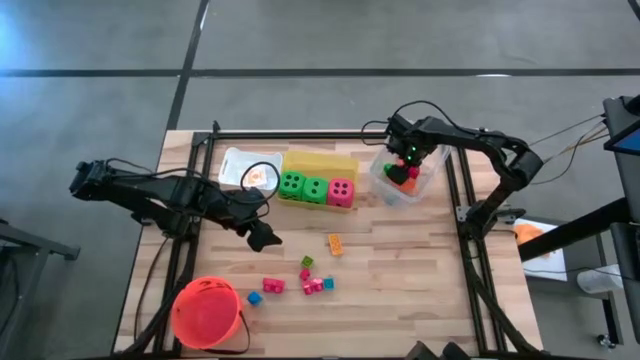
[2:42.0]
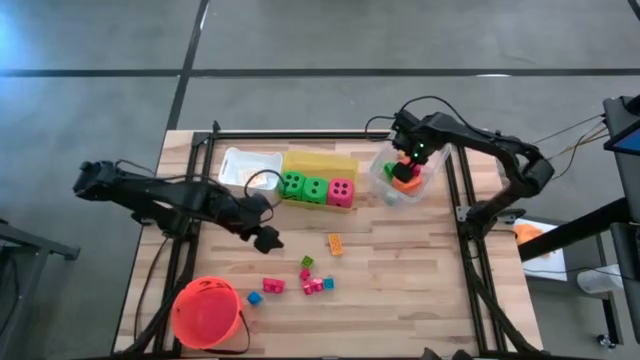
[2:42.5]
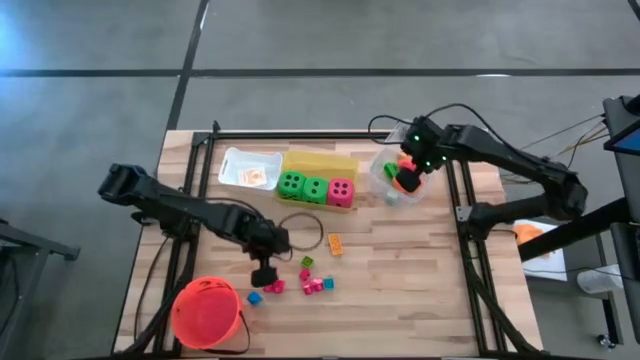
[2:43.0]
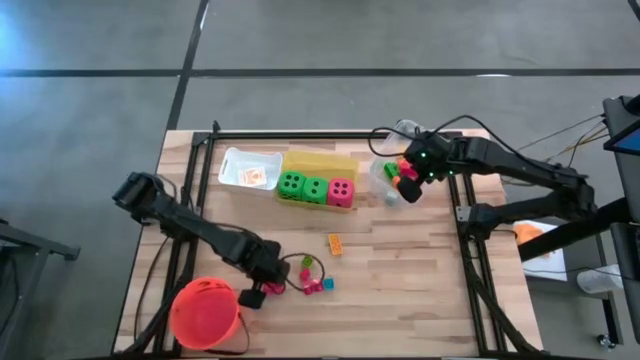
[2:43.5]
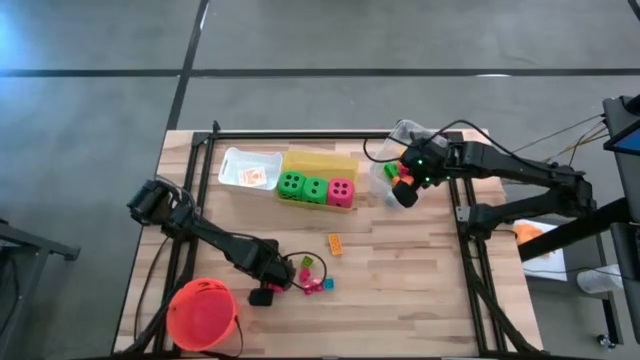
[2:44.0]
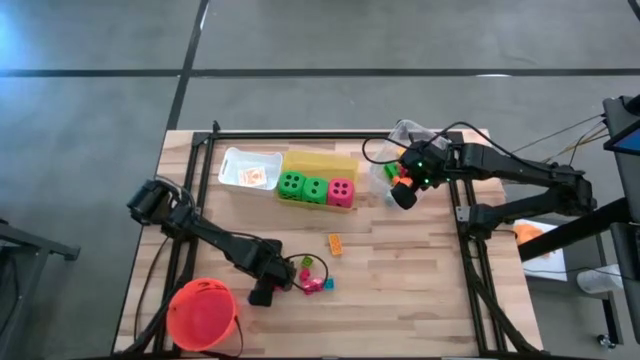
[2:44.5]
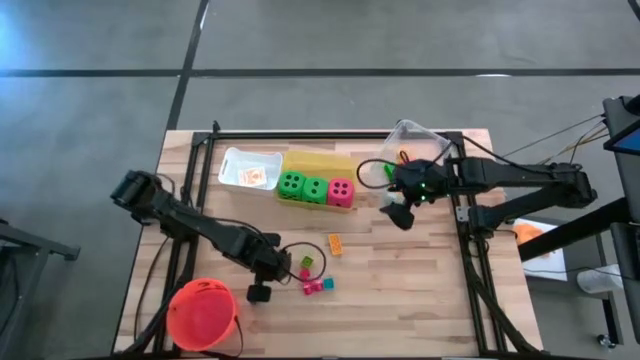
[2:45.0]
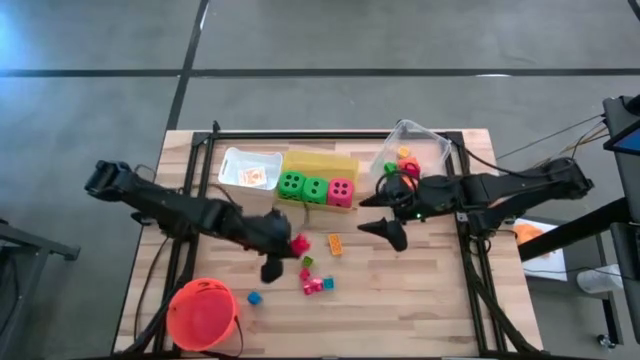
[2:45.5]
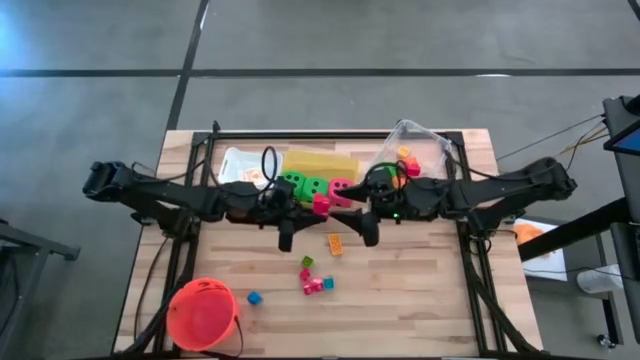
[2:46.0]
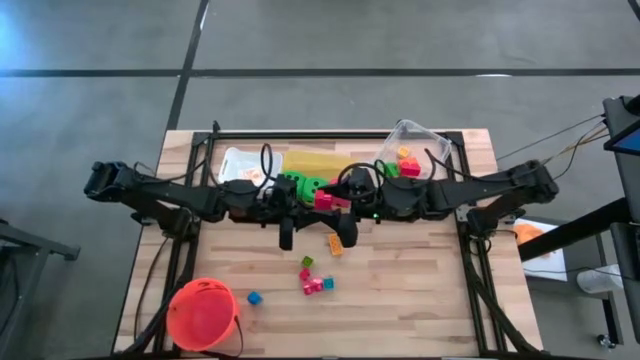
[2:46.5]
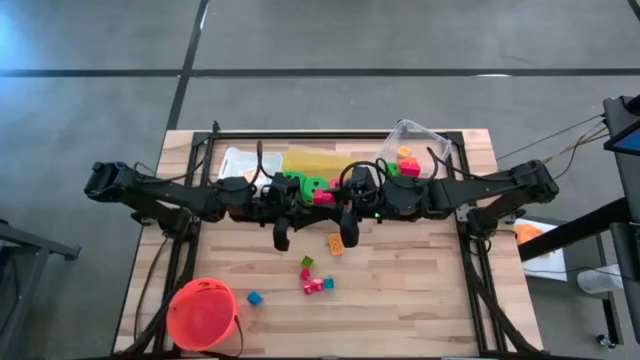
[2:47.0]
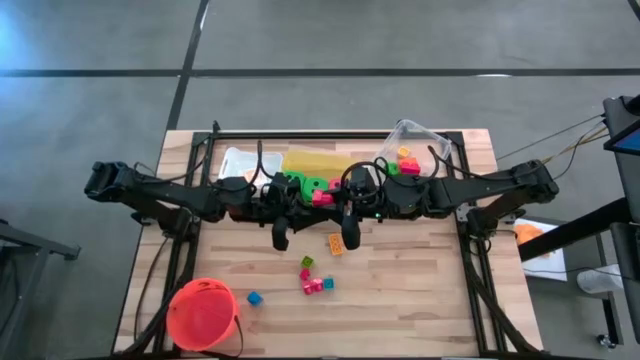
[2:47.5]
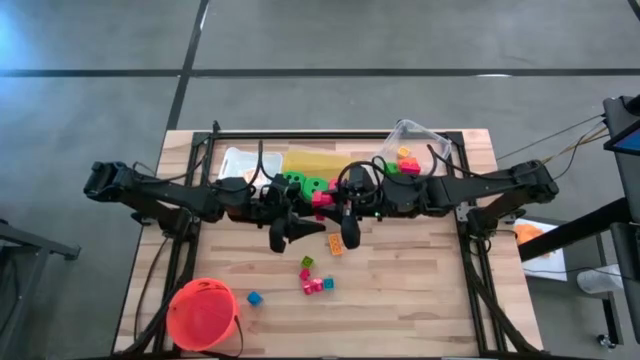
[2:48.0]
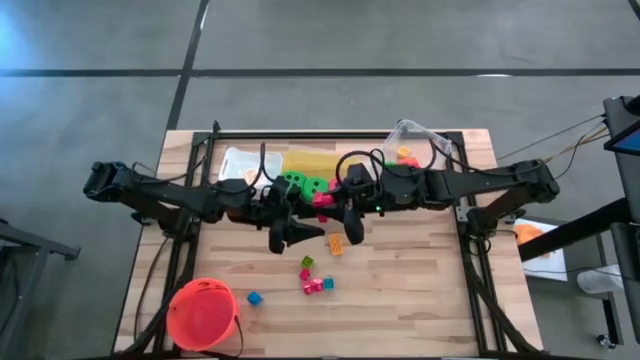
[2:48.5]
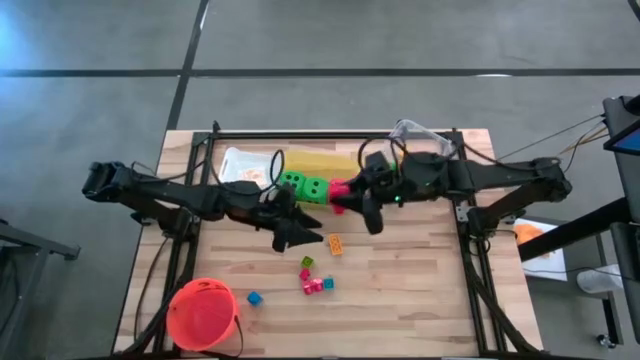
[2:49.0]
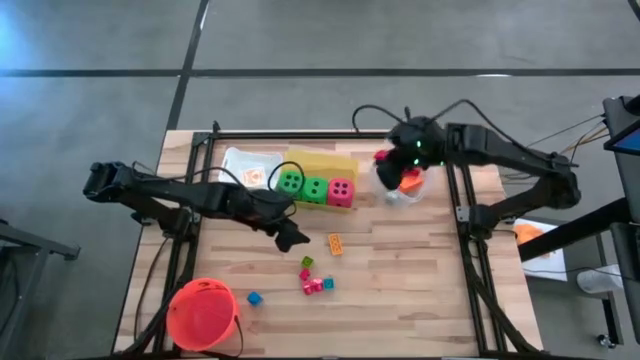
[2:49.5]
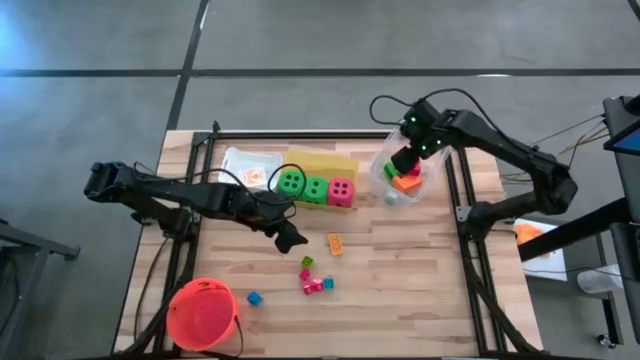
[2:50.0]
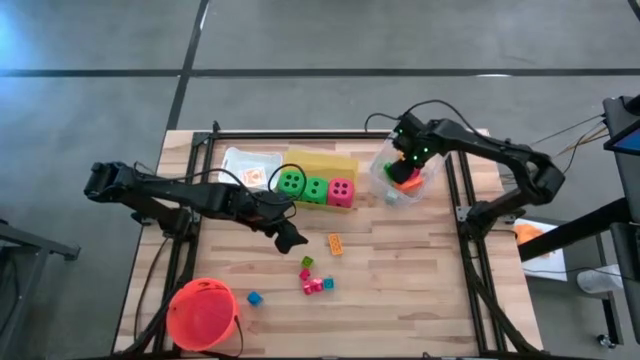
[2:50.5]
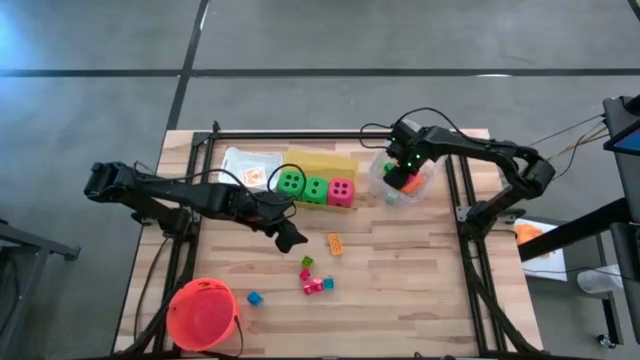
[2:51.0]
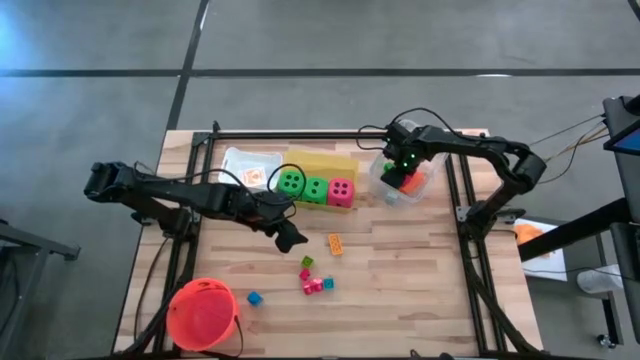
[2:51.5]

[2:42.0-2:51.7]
Task: Pick & Place Toys
Put the left red game piece into the transparent bin

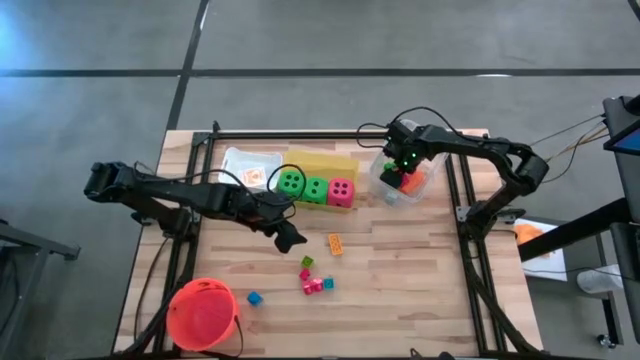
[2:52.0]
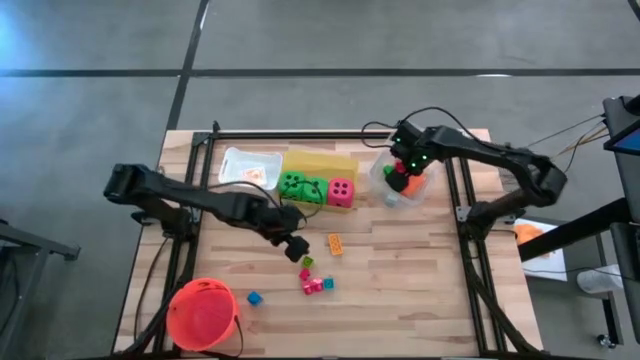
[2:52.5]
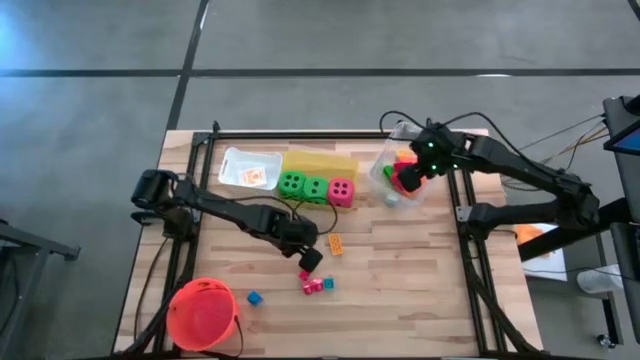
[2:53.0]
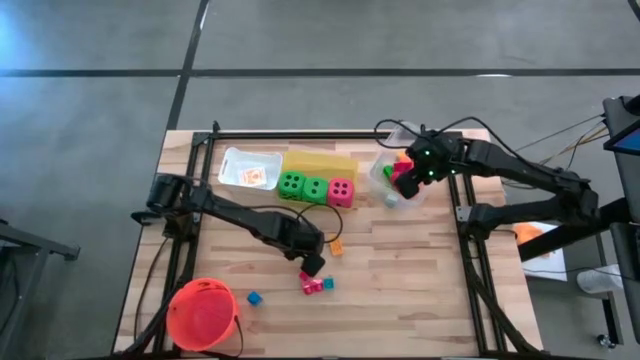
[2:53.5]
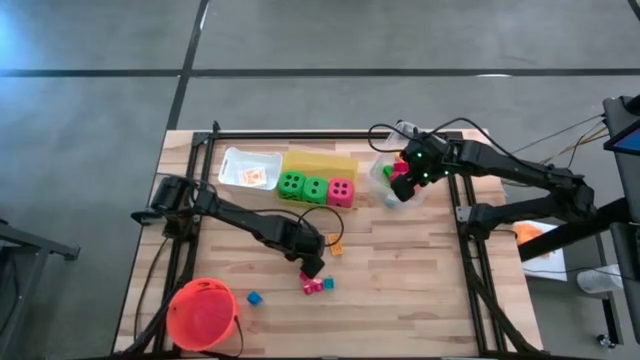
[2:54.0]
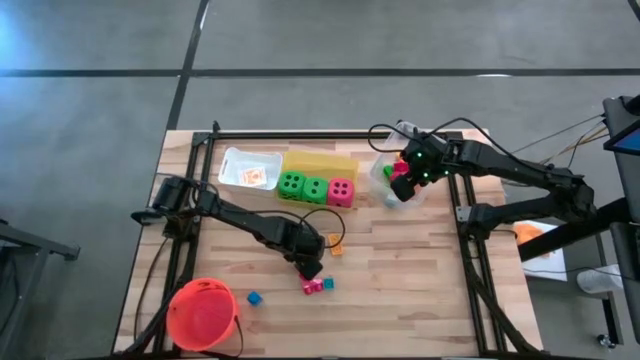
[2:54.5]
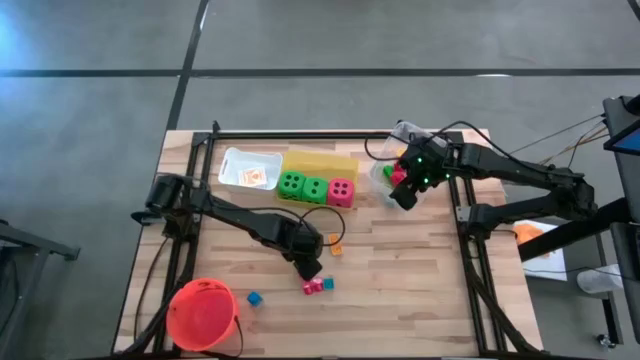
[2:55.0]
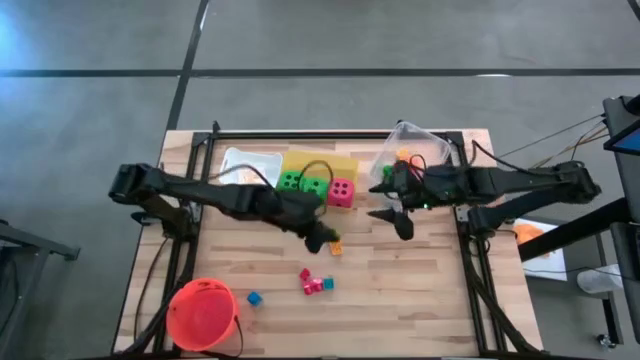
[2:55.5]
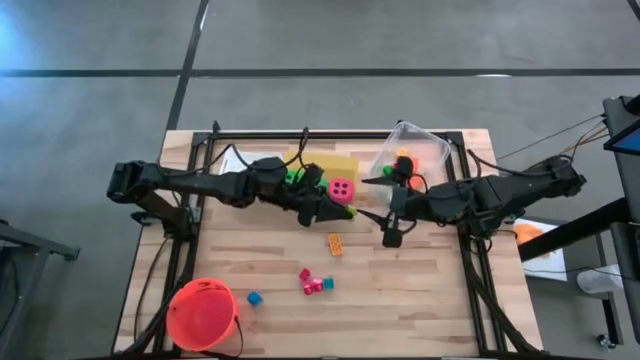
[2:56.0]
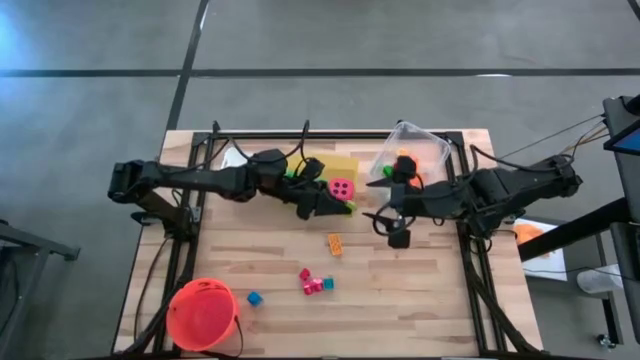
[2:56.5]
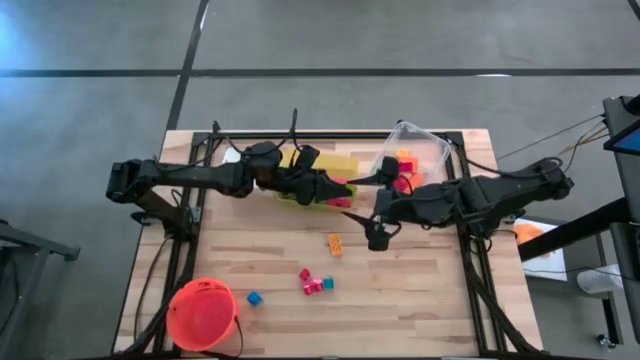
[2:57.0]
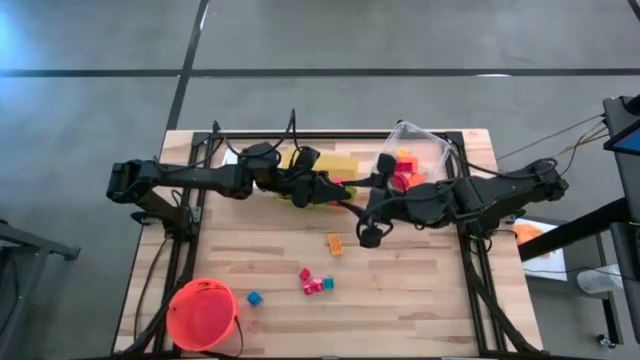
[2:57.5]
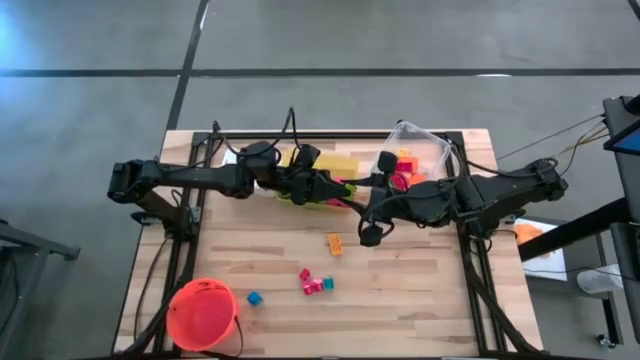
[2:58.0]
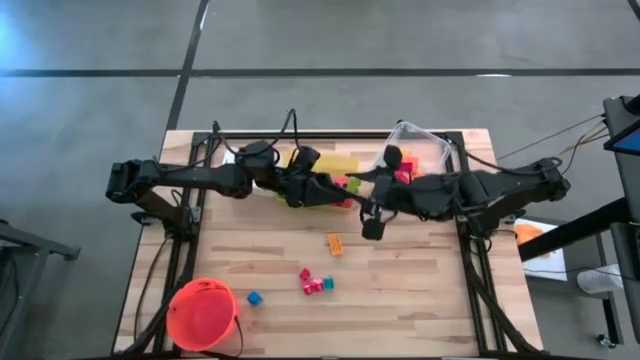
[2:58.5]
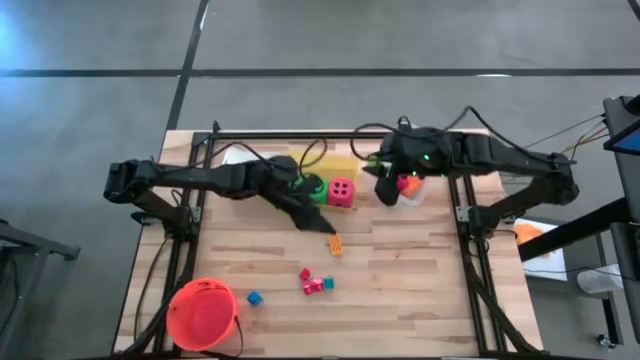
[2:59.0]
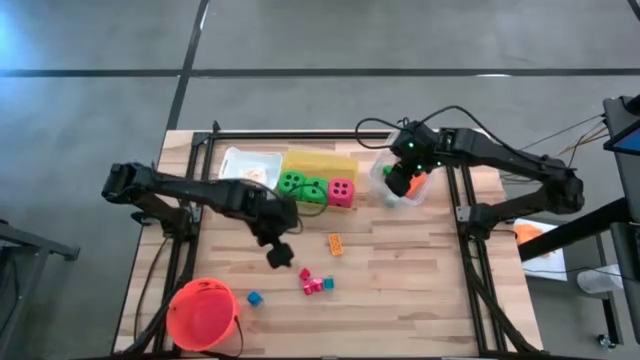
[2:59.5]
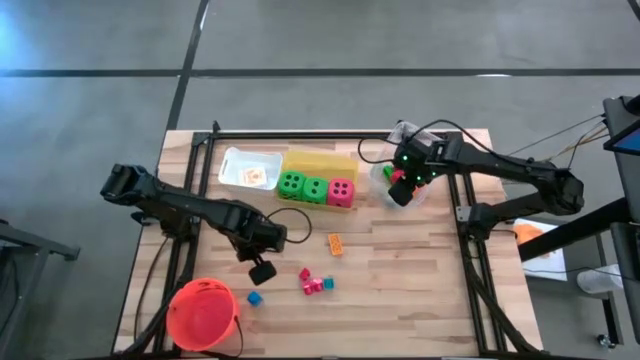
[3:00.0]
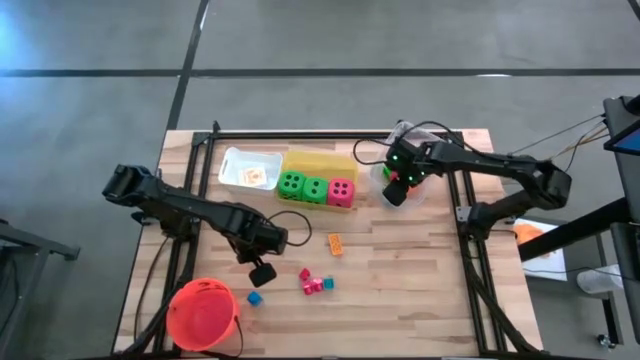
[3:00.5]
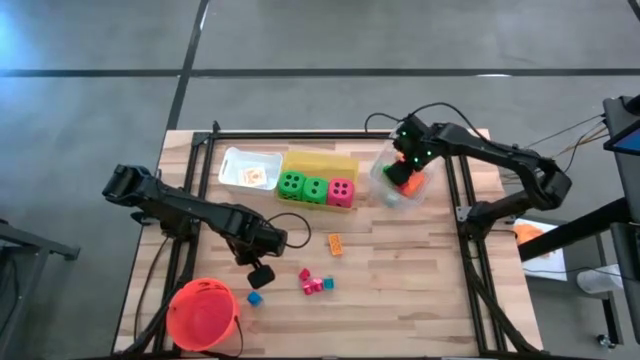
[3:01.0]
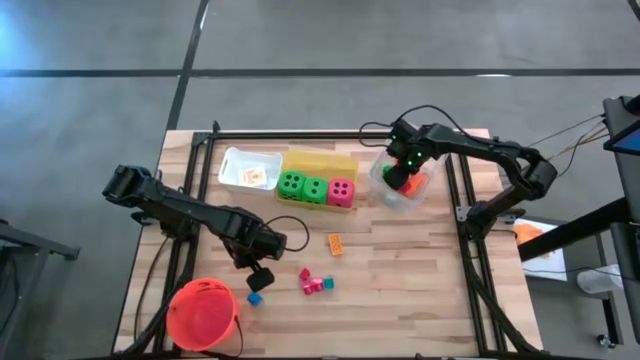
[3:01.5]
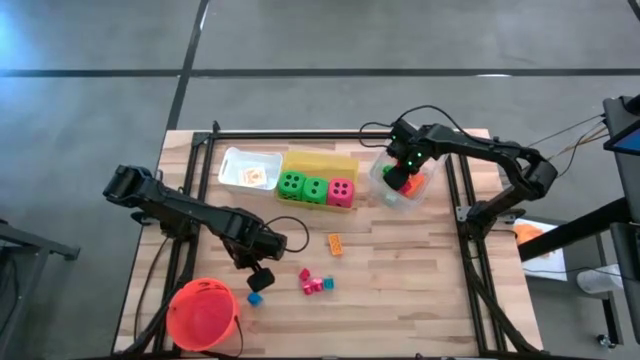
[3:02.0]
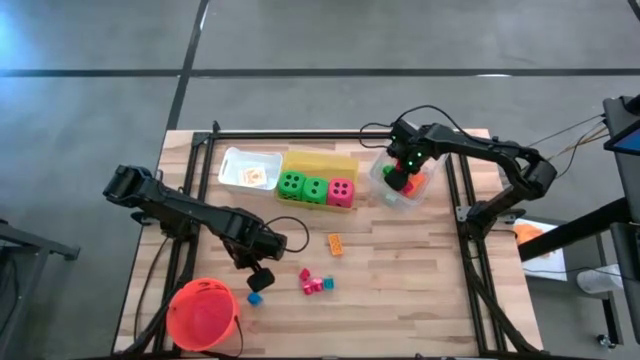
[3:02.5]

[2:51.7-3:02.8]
Put the green game piece into the transparent bin

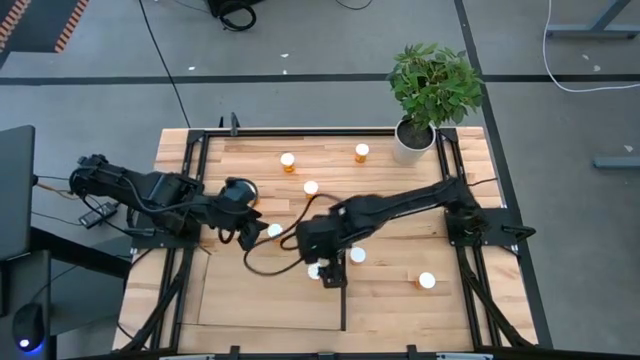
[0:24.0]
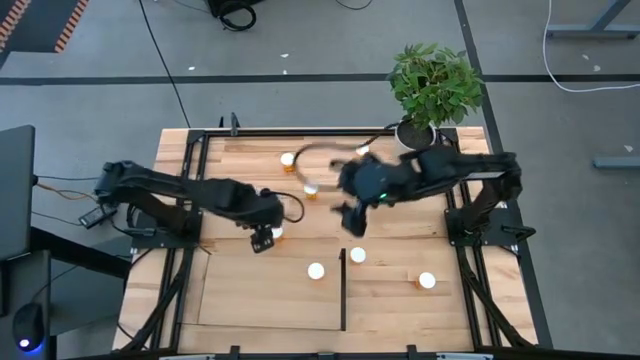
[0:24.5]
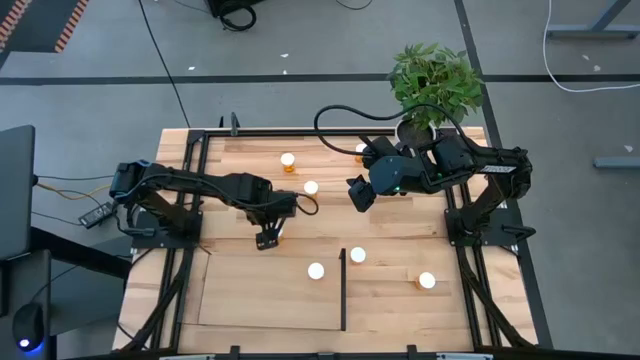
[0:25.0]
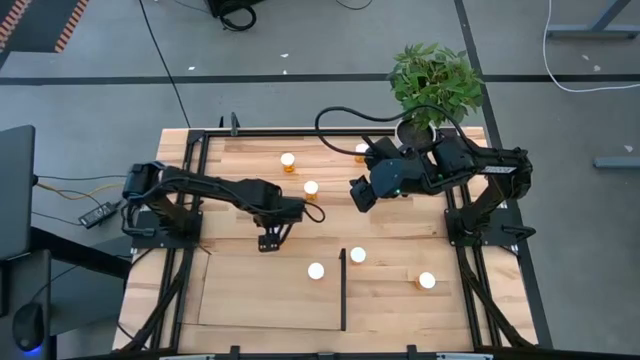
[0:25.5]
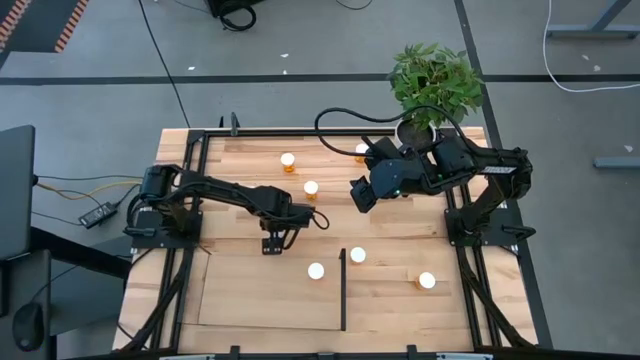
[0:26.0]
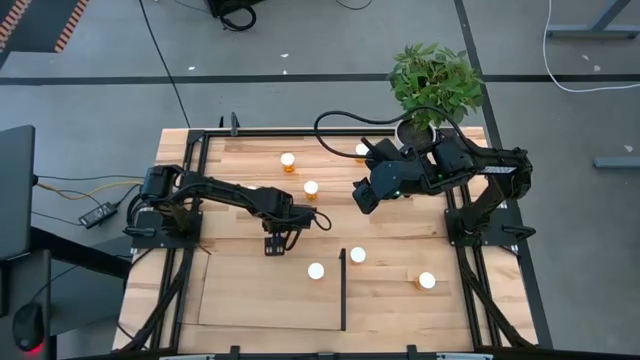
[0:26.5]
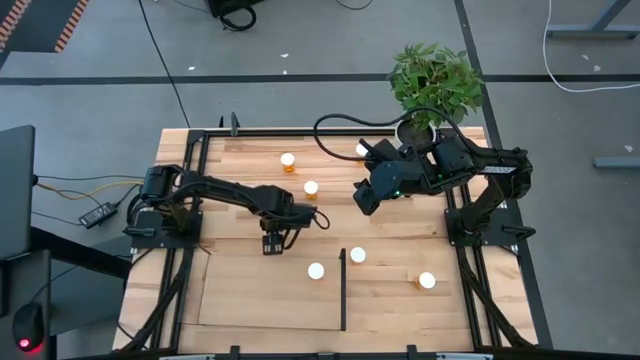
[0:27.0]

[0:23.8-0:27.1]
Task: Pick and place medicine bottles onto shelf by color
Align the orange pill bottle with the other orange pill bottle on the shelf
